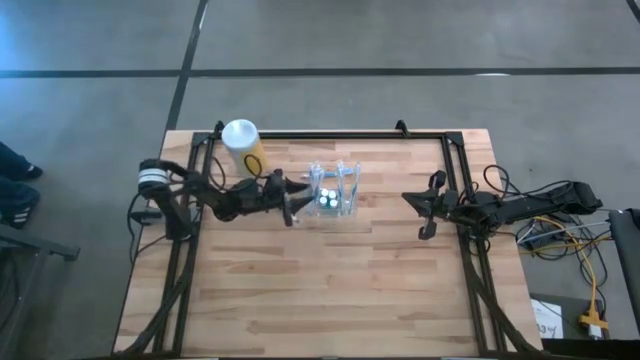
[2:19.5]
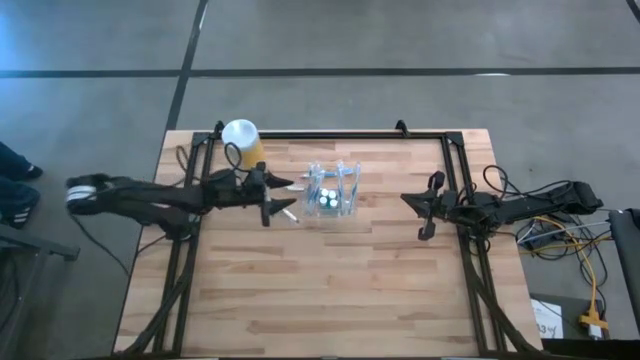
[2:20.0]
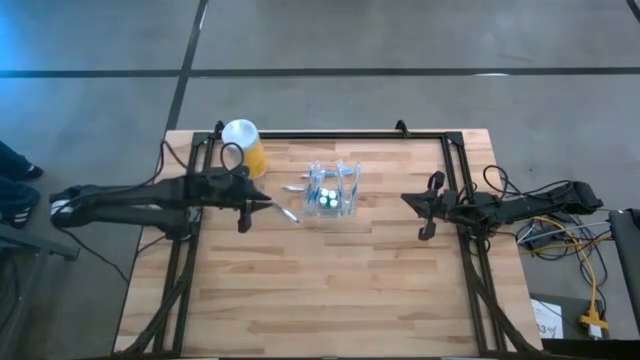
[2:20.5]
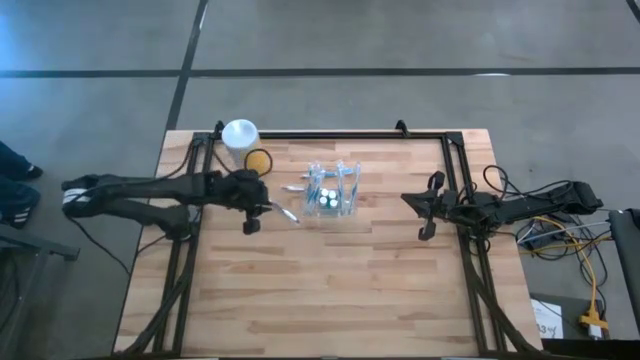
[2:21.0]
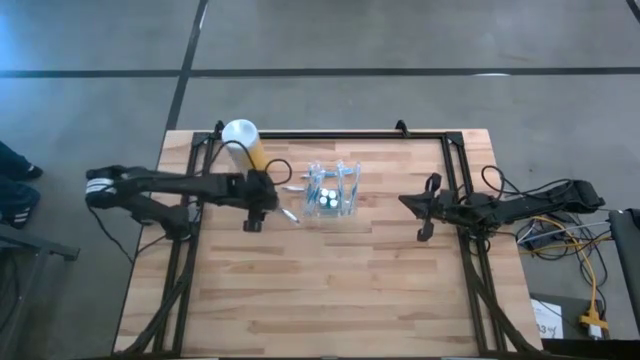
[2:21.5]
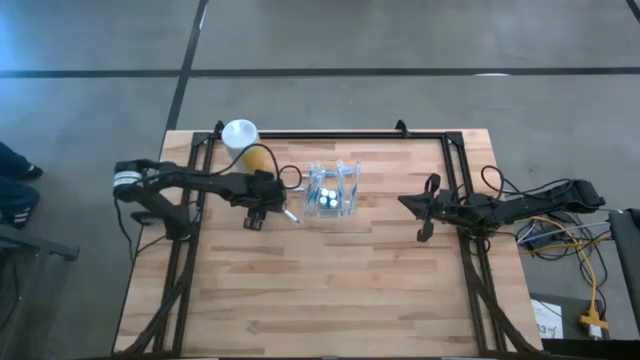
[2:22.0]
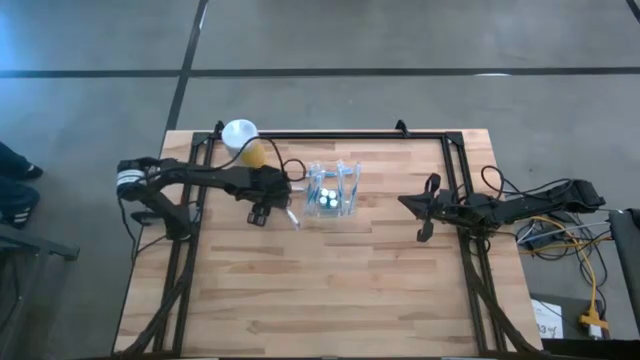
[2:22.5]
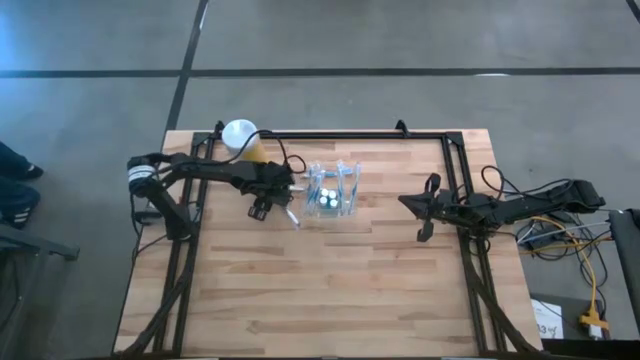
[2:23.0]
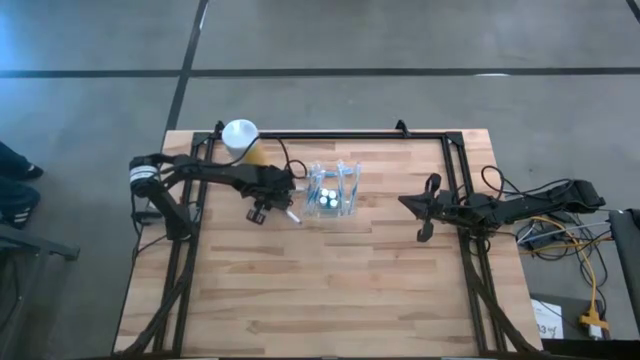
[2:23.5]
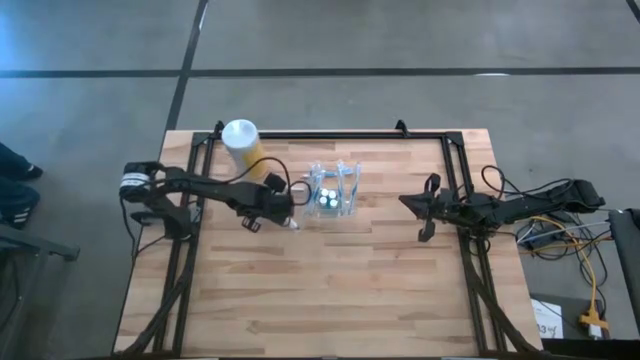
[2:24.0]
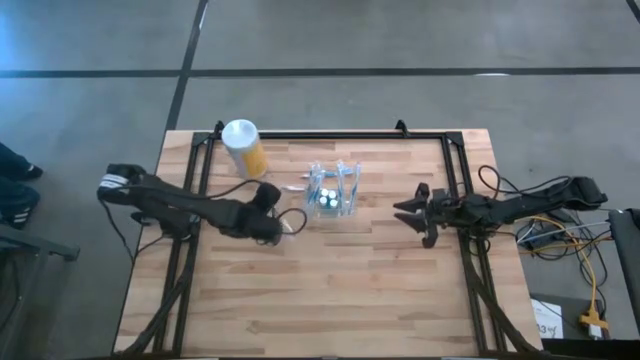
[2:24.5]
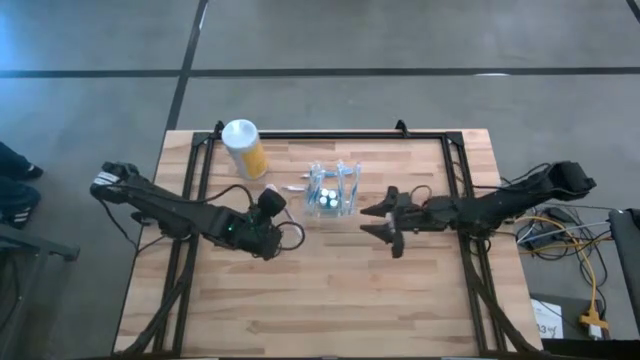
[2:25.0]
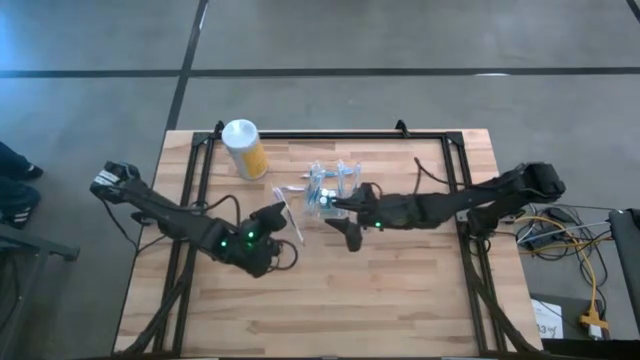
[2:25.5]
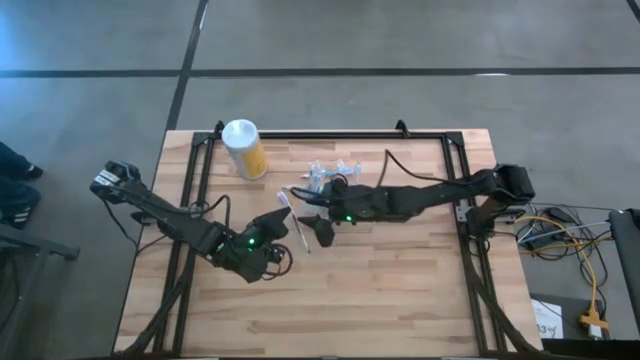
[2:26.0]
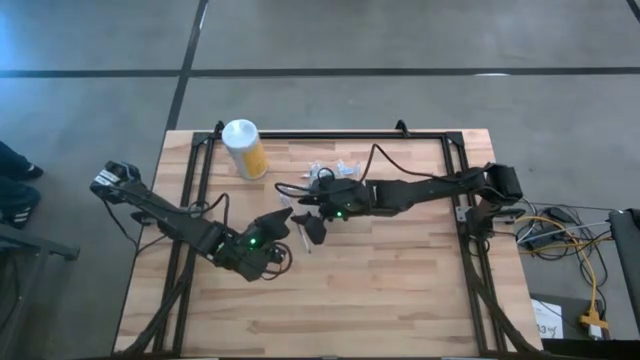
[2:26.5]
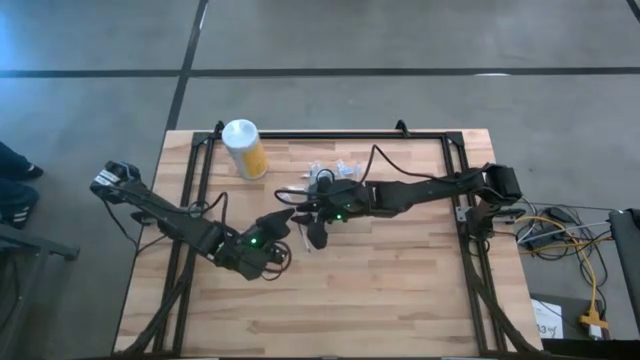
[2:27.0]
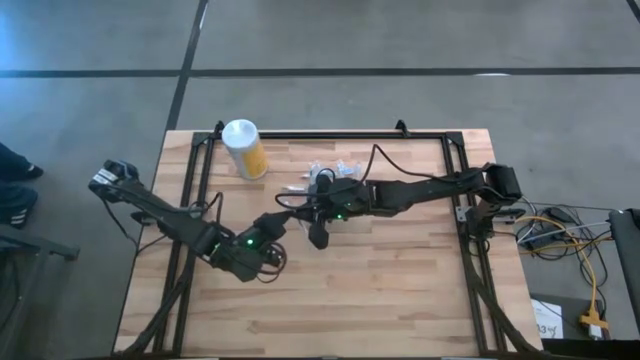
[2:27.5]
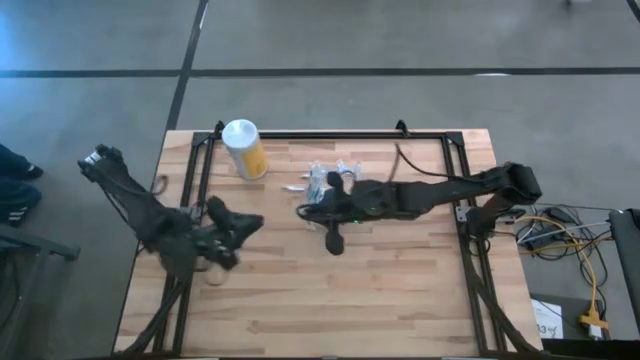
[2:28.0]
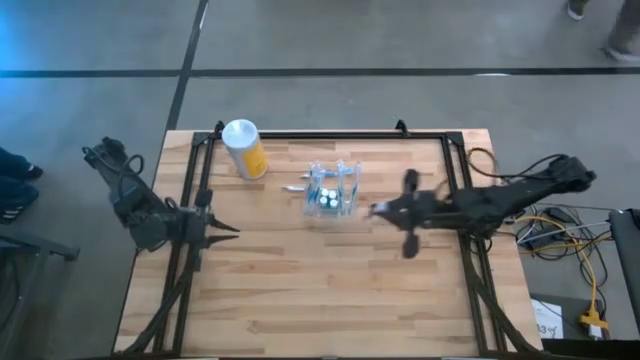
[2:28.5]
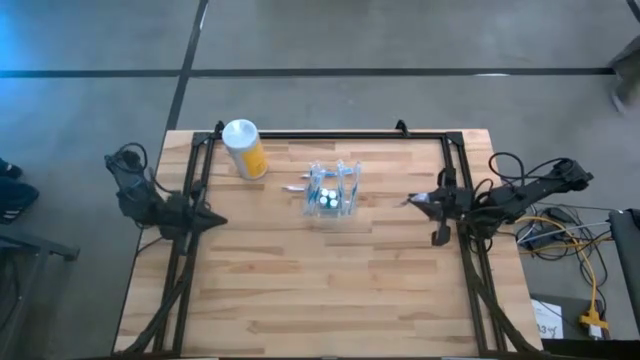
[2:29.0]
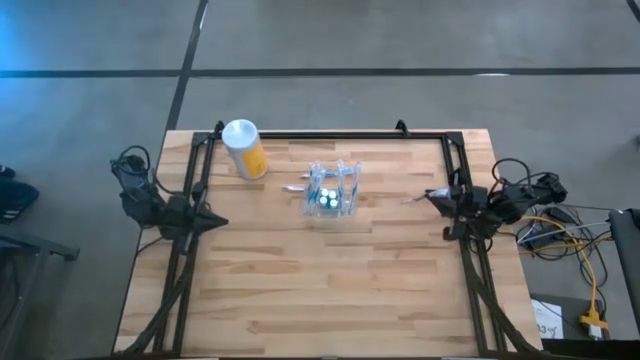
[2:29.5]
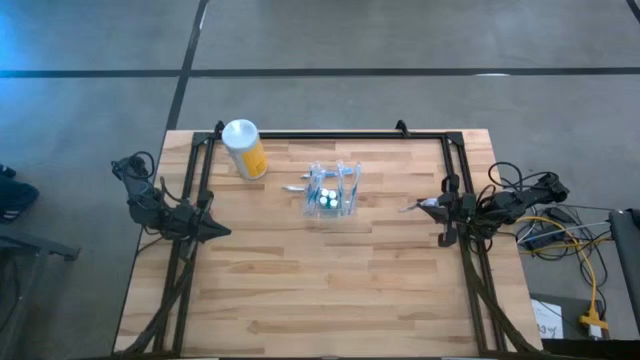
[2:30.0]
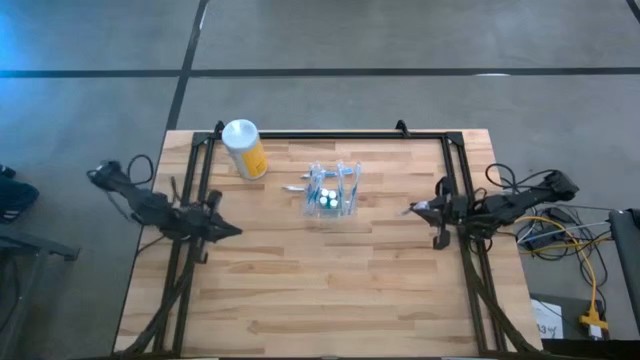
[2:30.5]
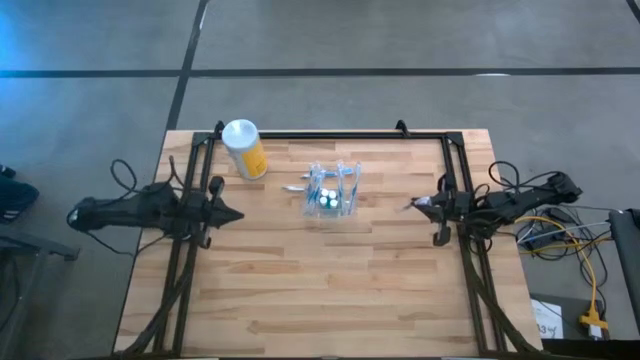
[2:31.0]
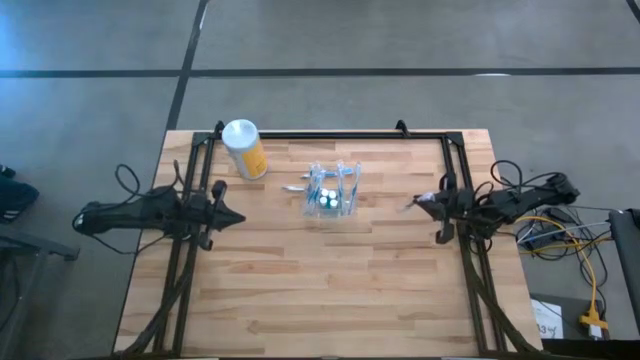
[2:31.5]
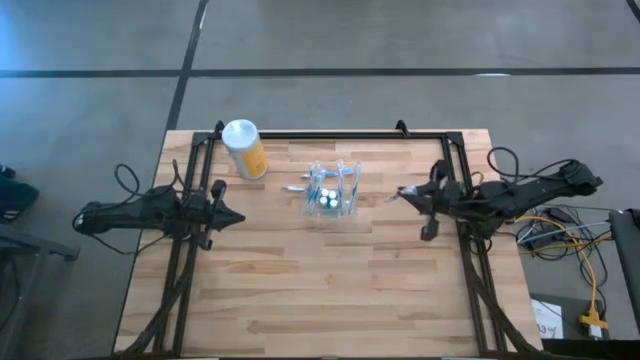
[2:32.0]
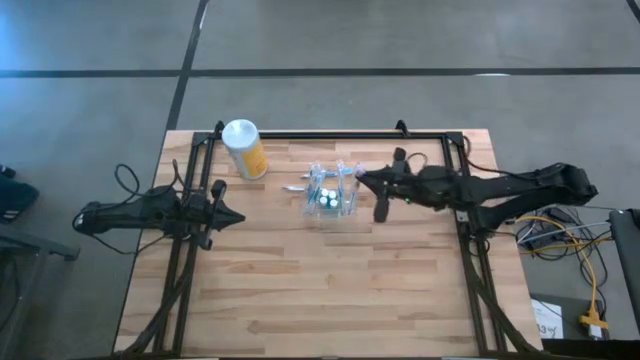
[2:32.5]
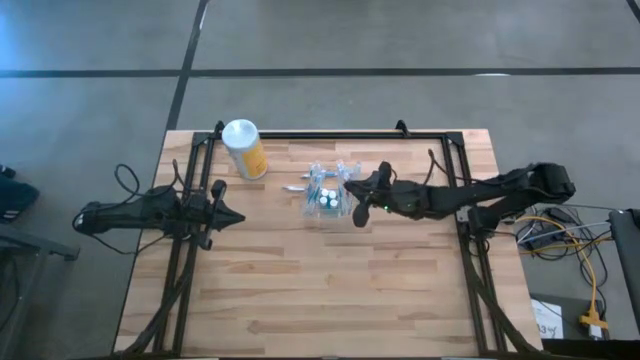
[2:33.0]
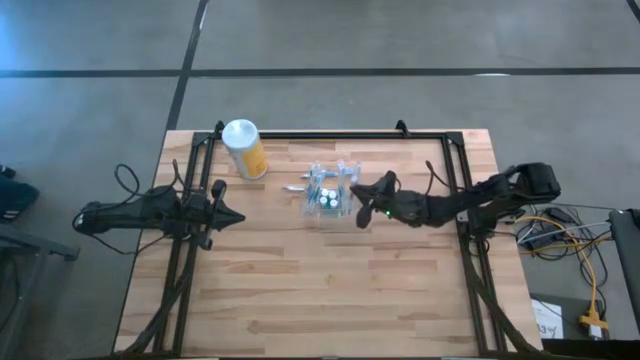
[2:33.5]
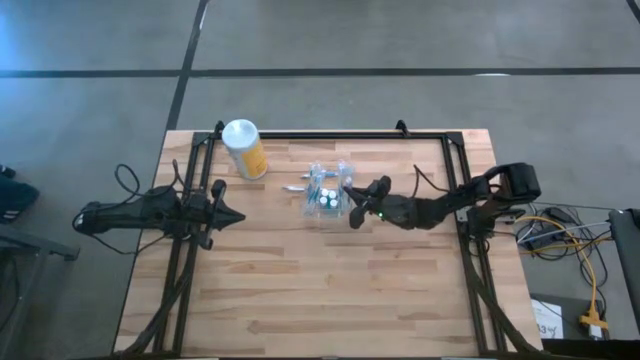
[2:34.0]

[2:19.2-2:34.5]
Task: Pick & Place toothbrushing station
Put the bottom purple toothbrush into the right section of the transparent organizer

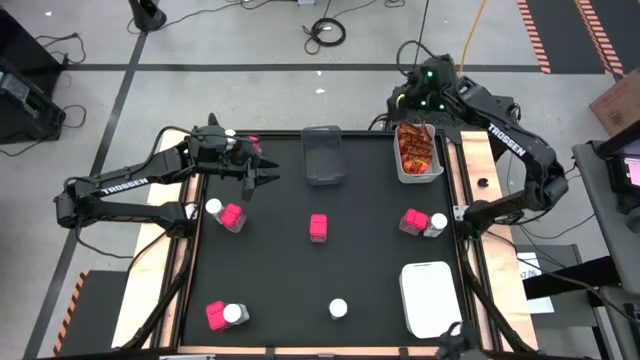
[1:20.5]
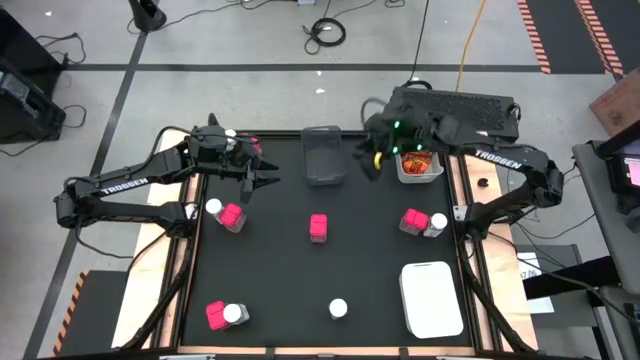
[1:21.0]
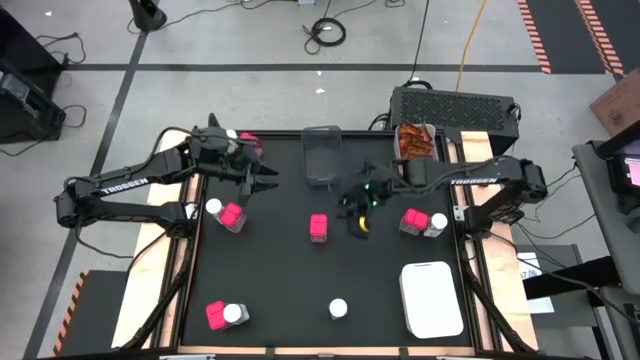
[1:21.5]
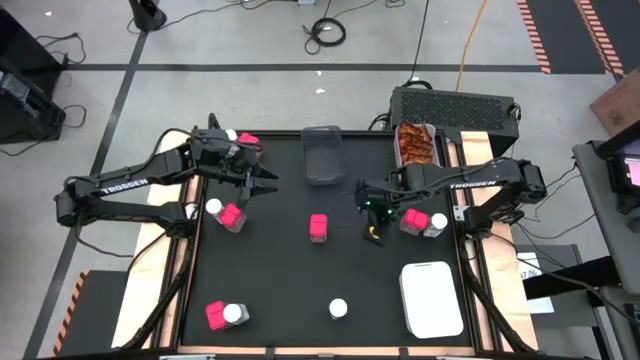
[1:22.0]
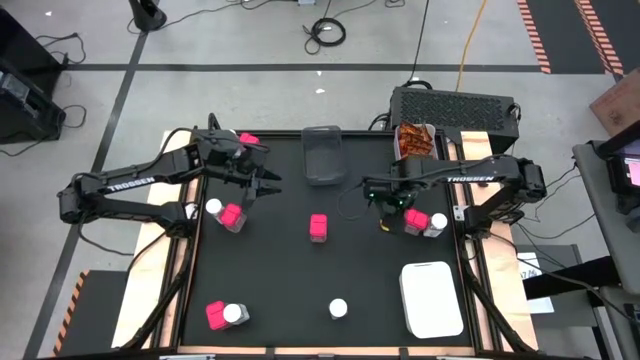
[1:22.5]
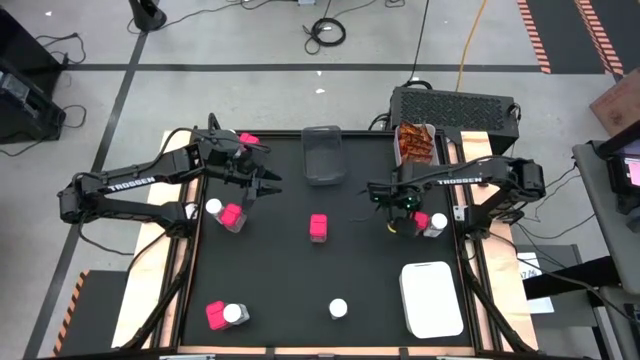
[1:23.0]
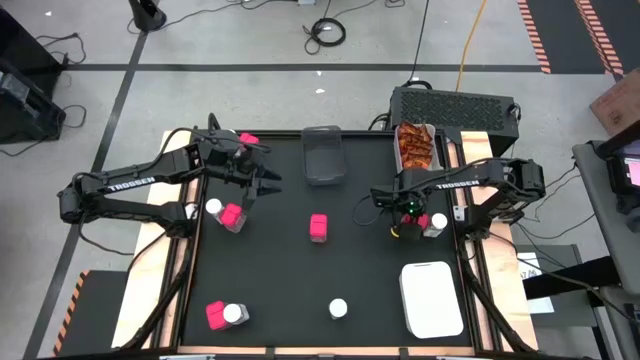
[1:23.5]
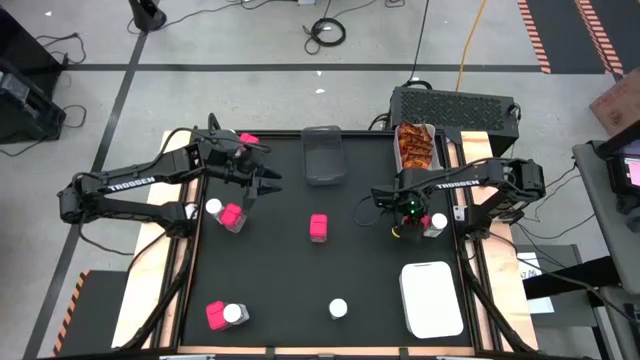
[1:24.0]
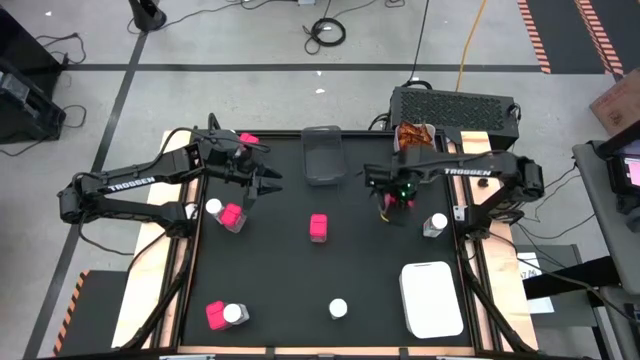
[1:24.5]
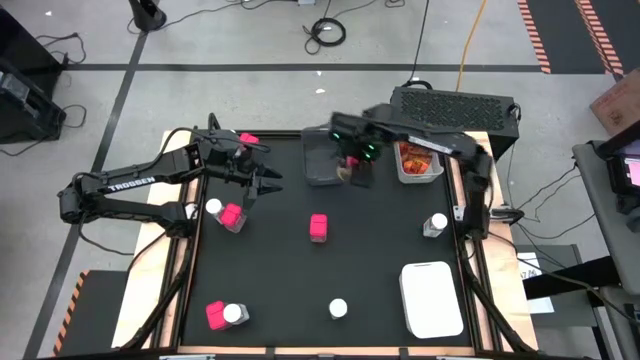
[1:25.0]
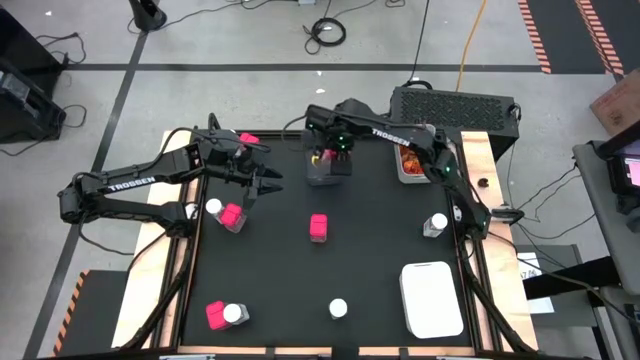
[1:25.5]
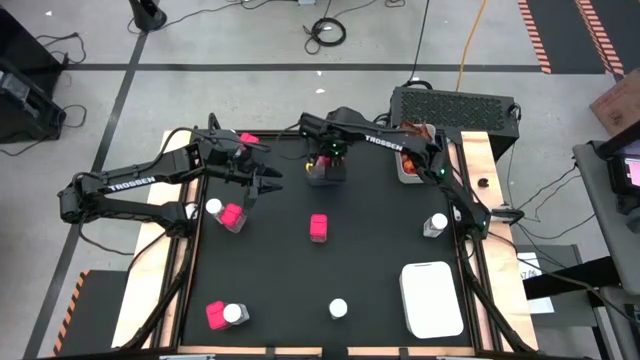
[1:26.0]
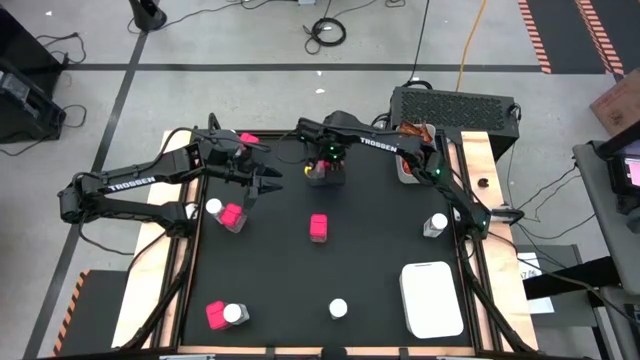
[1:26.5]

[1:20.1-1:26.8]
Task: Sort spices by type
Put the red seasoning can into the black transparent bin
